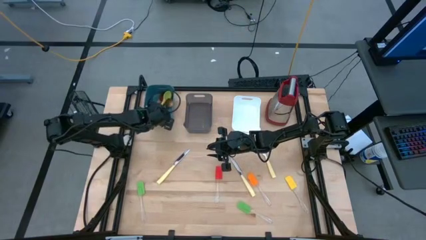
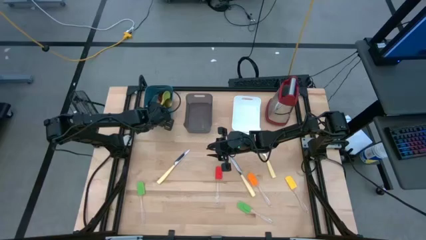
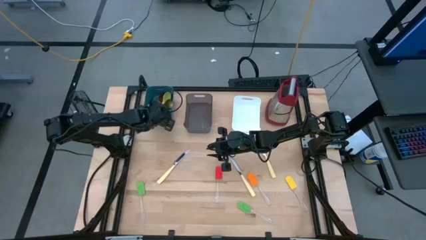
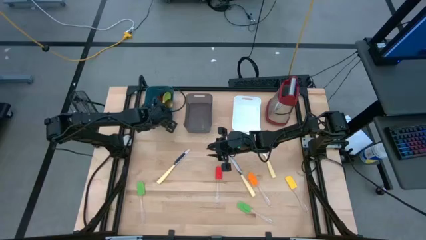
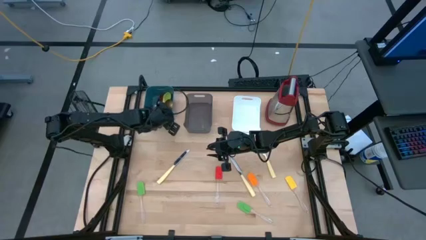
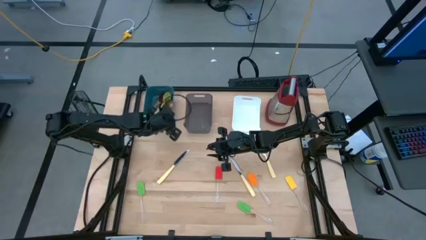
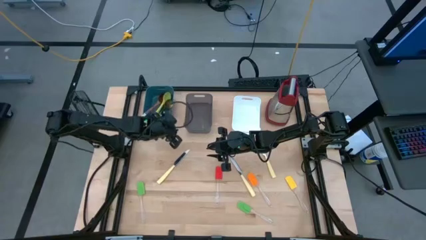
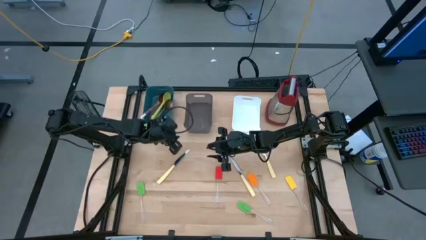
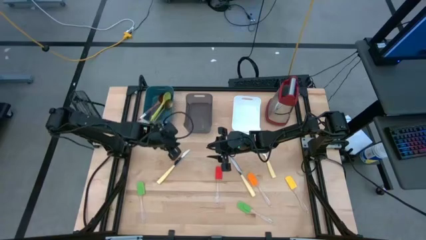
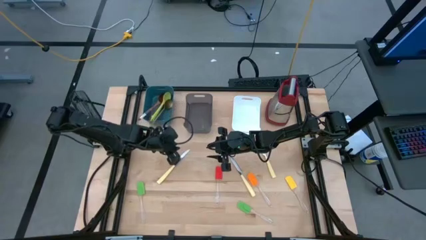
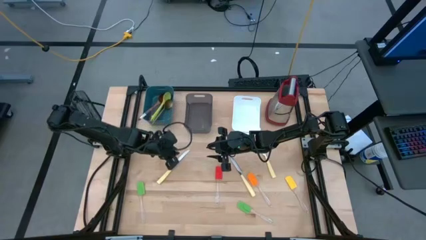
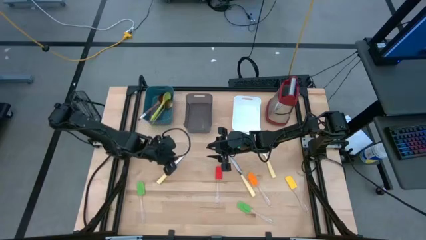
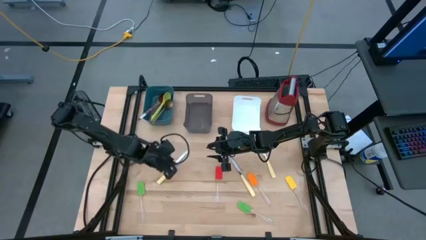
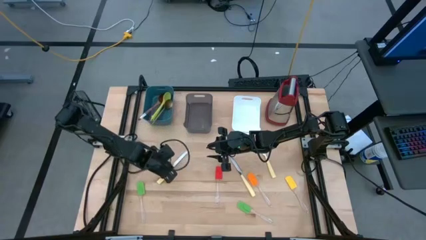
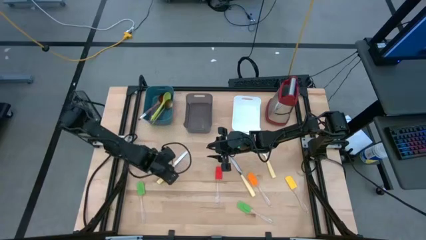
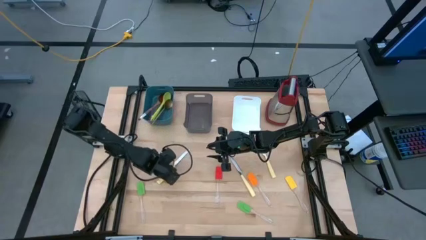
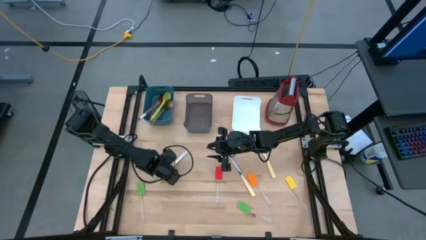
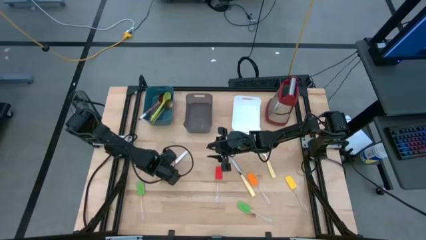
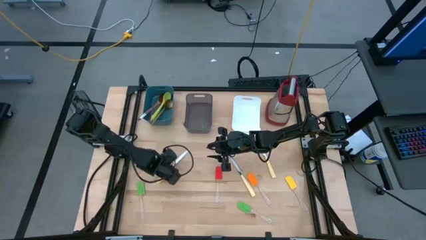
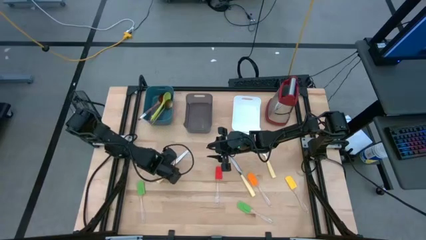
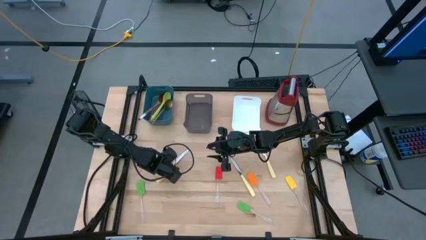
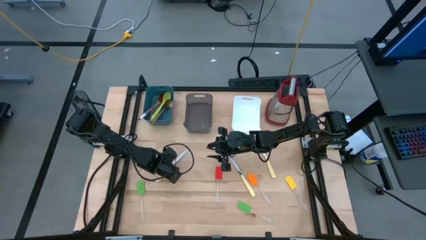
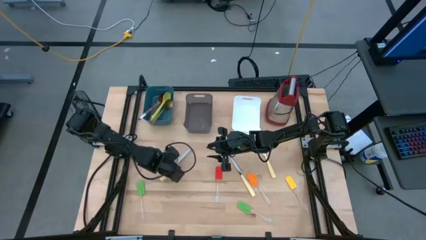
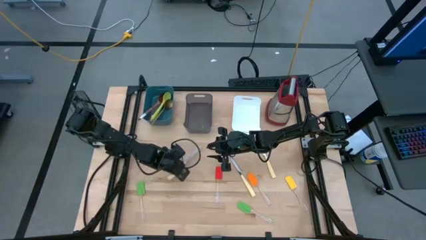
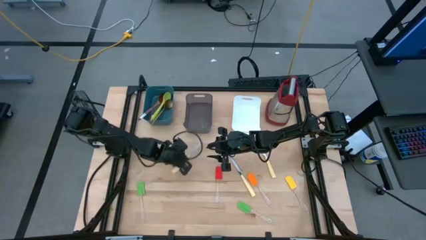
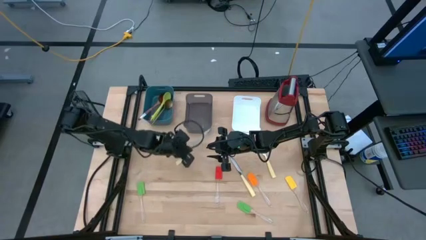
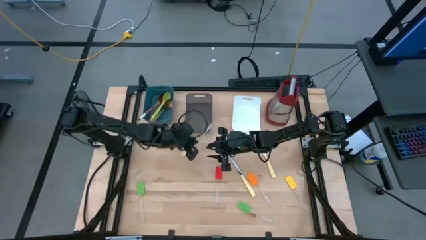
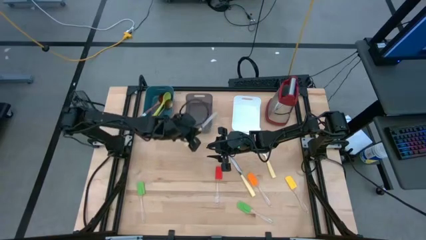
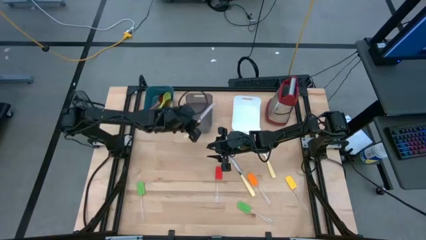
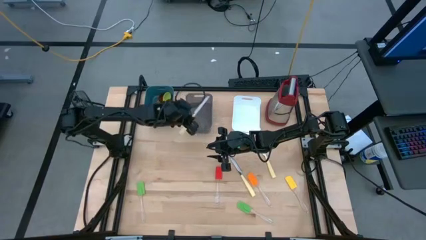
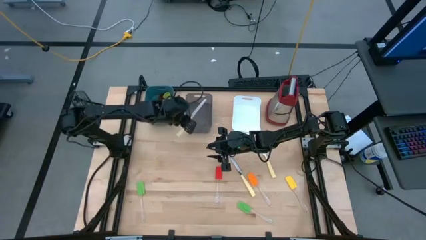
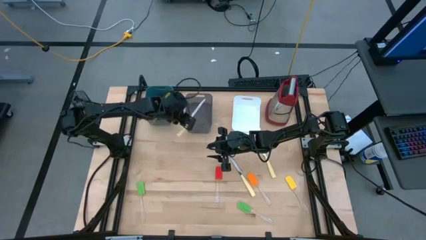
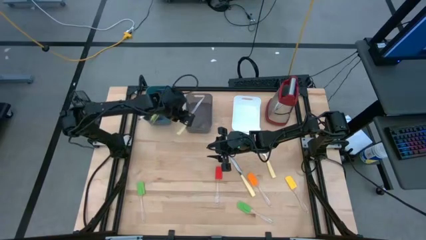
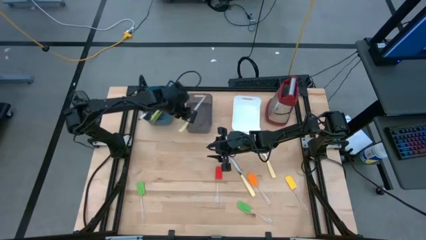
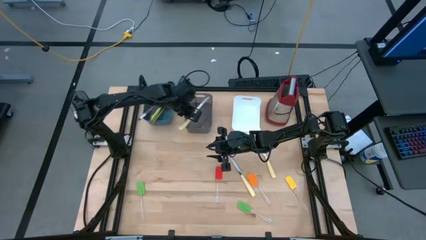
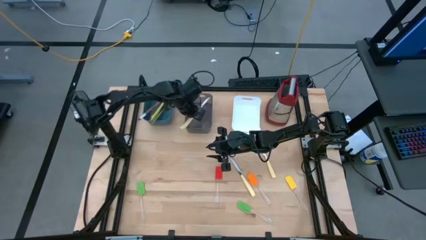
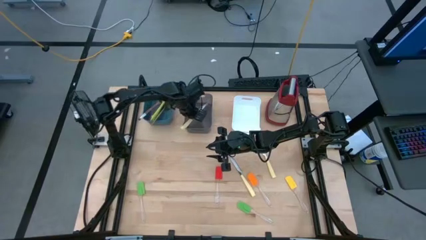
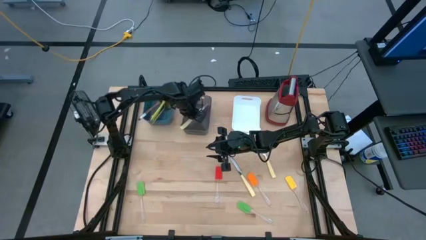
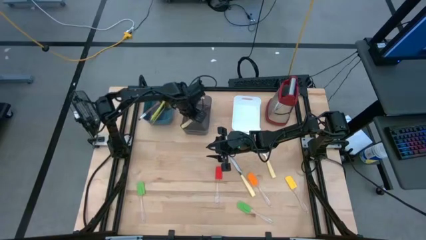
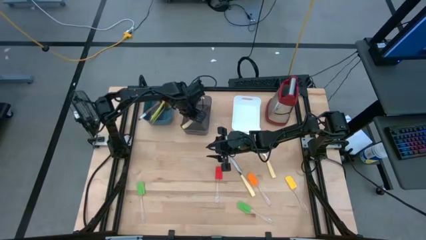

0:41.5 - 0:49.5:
Task: Pick & Place Kitchen Items
Put the left yellow knife into the black bin

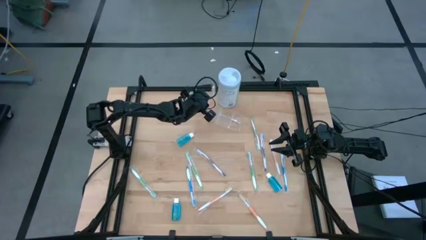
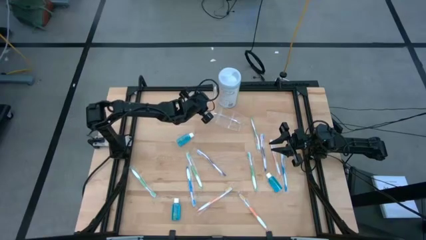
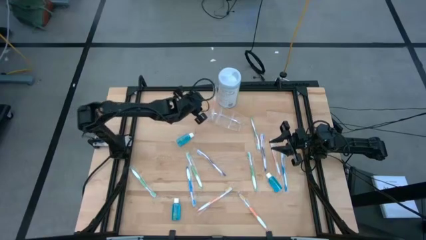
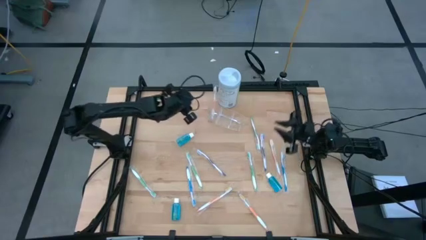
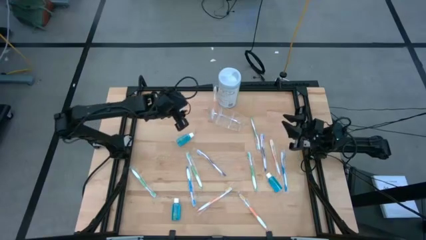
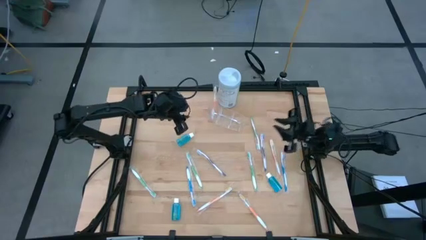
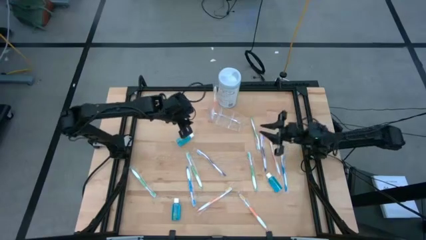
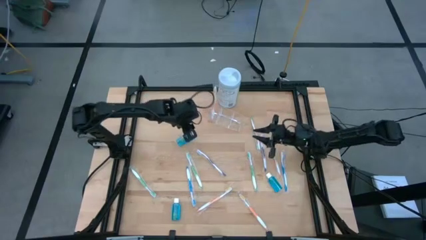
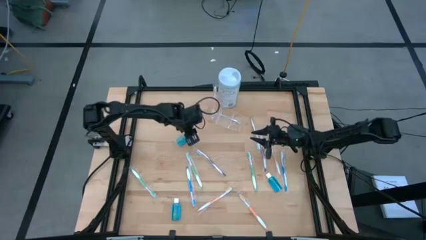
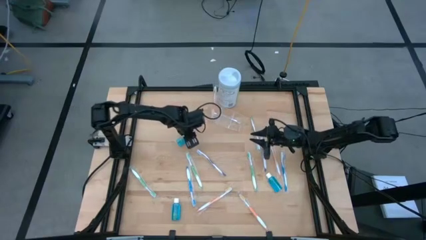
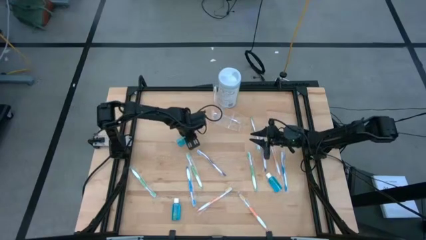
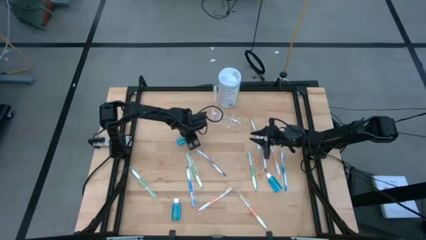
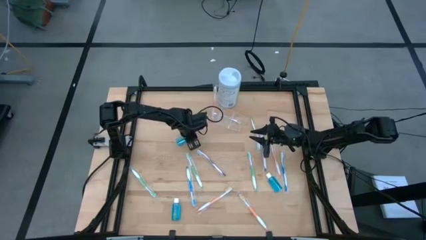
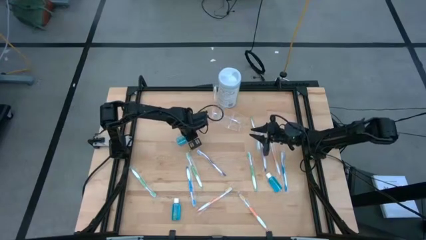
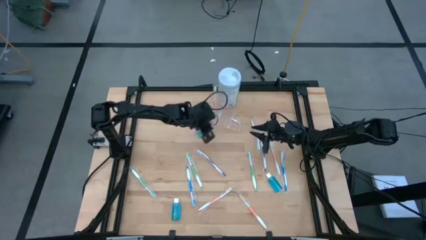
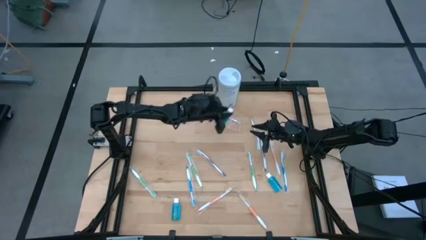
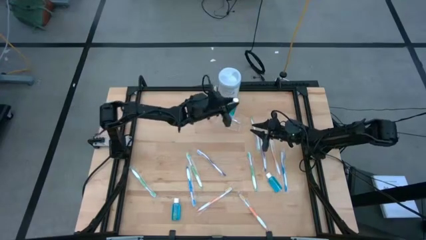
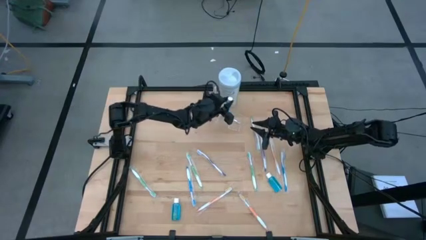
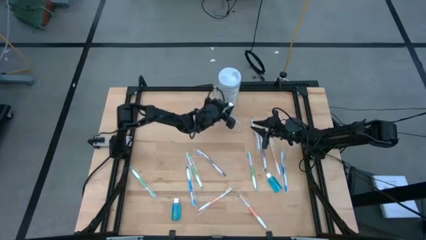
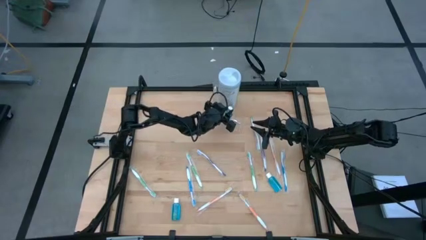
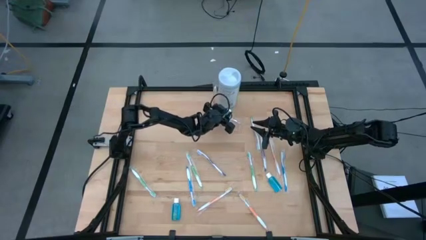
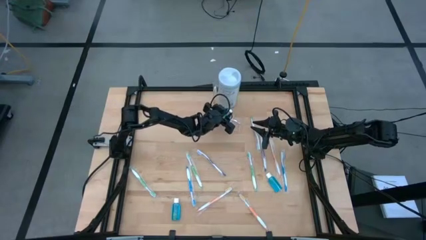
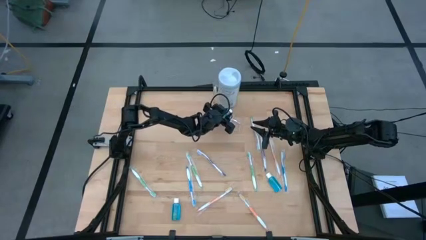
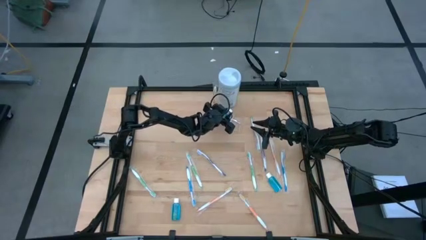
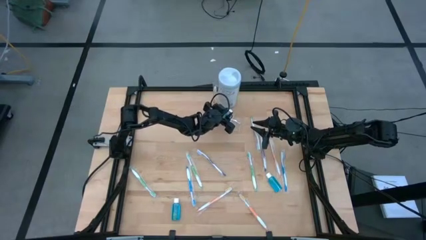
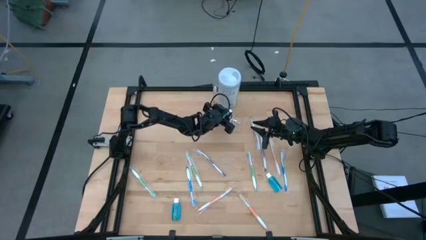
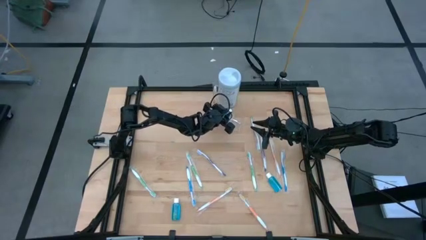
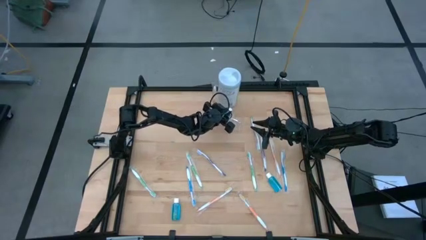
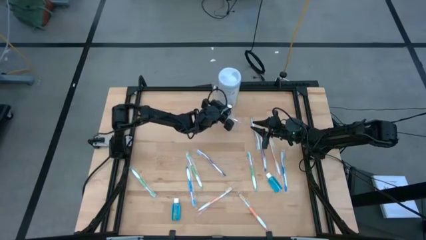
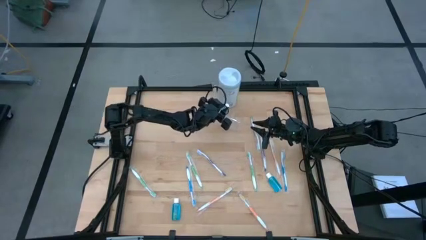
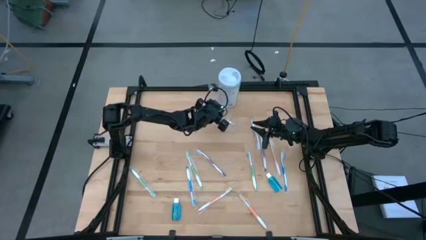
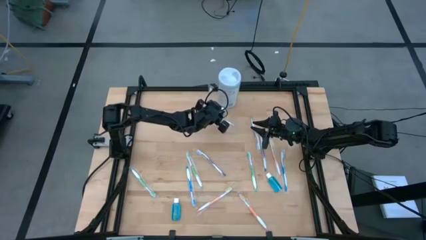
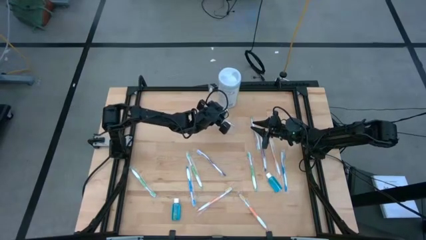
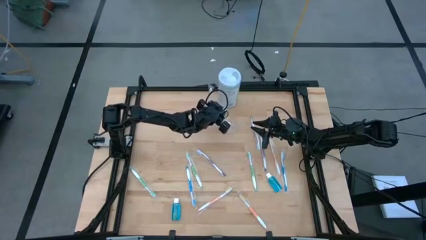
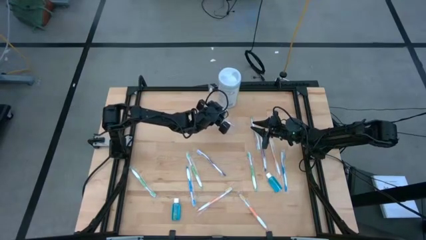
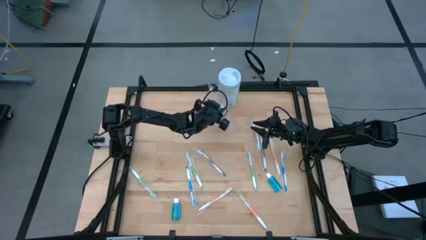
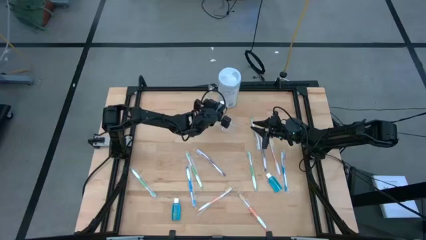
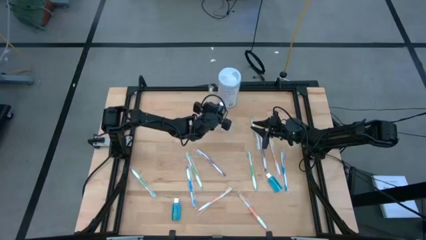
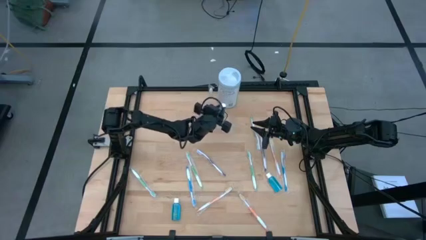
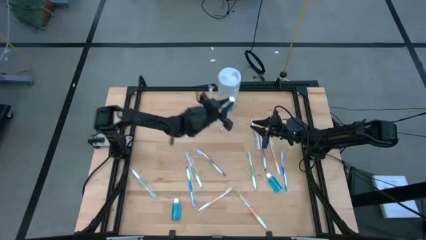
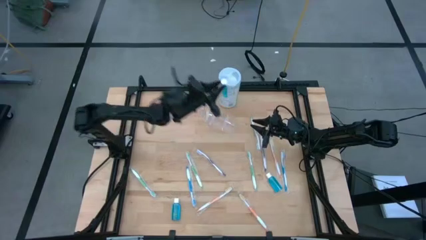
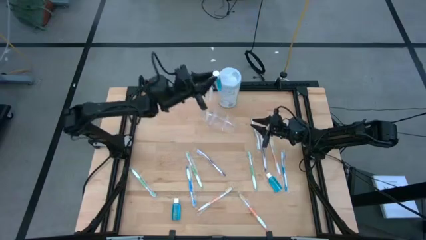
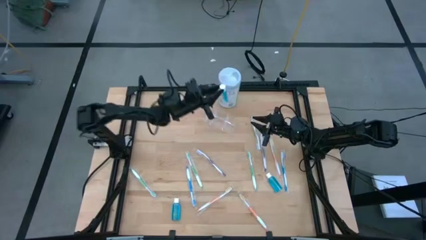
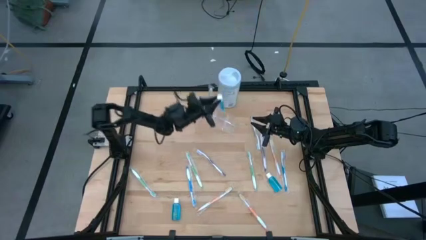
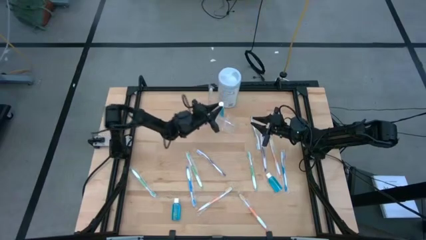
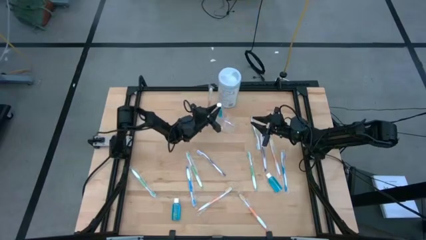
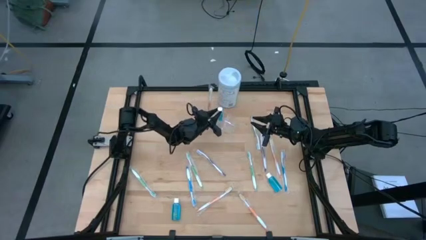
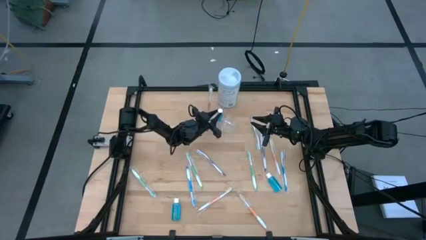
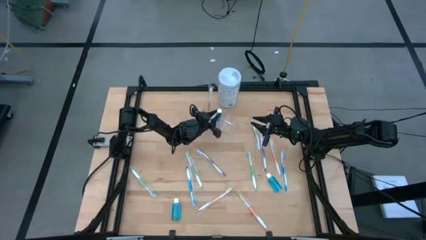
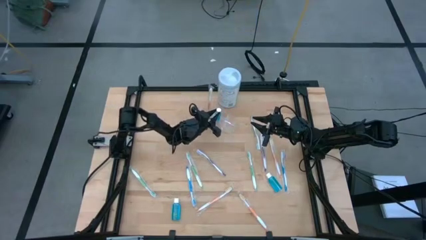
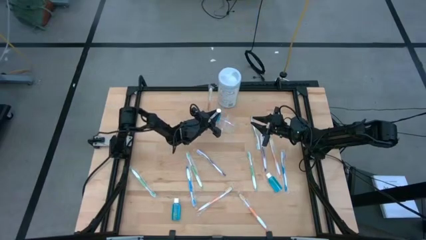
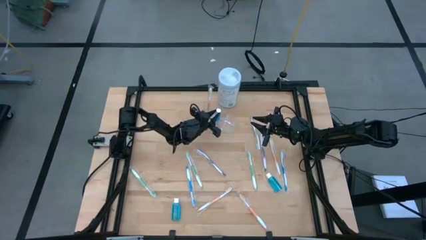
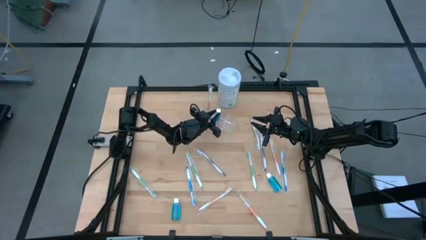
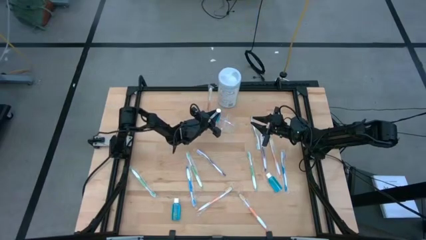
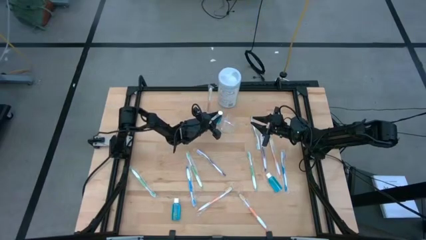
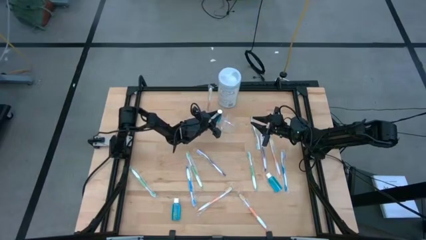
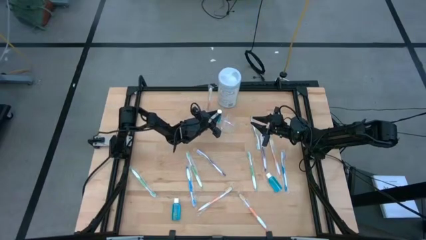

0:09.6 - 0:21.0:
Task: Pick & Place toothbrushing station
Put the top blue mouthwash into the transparent organizer
